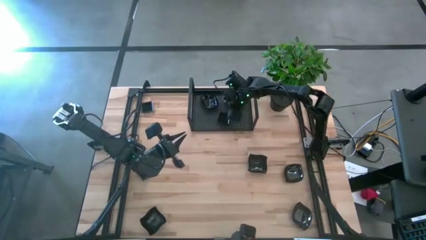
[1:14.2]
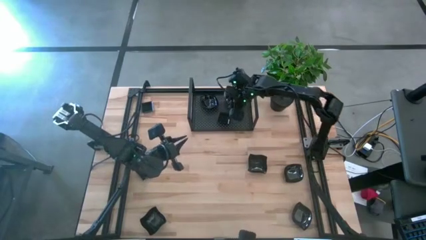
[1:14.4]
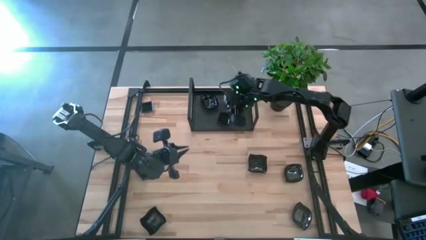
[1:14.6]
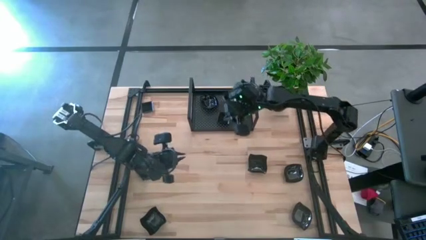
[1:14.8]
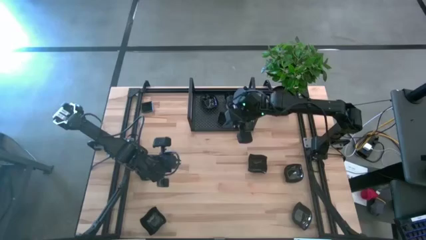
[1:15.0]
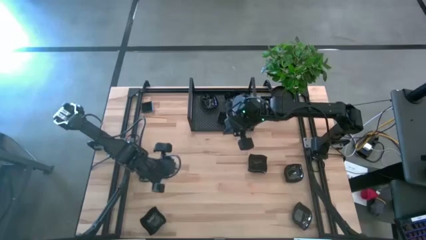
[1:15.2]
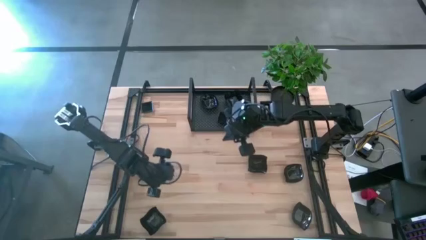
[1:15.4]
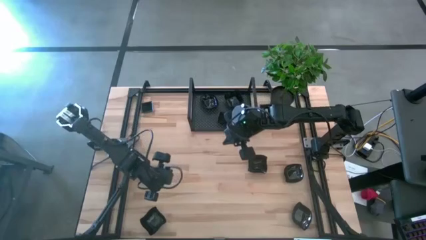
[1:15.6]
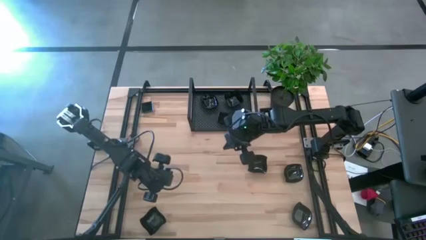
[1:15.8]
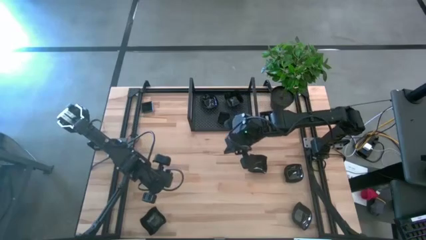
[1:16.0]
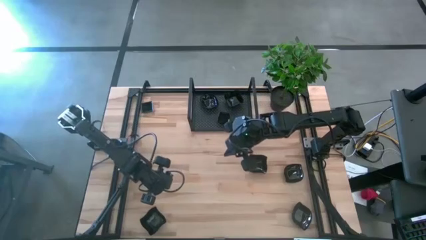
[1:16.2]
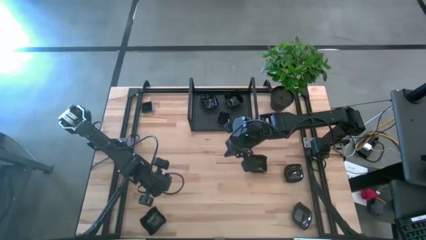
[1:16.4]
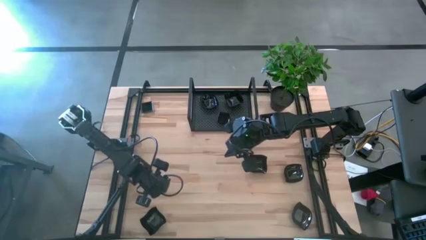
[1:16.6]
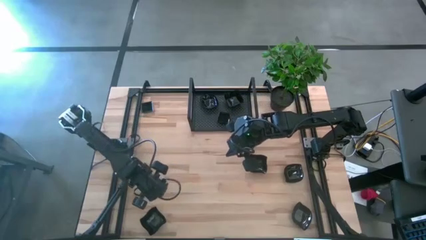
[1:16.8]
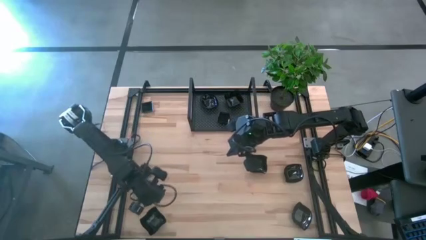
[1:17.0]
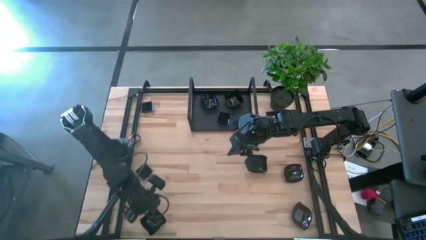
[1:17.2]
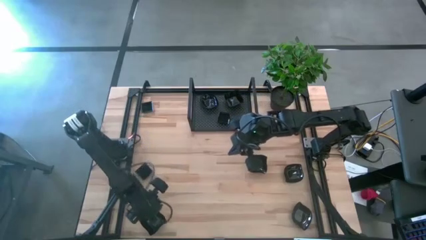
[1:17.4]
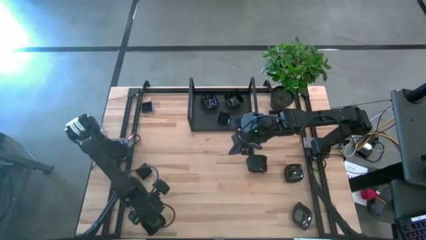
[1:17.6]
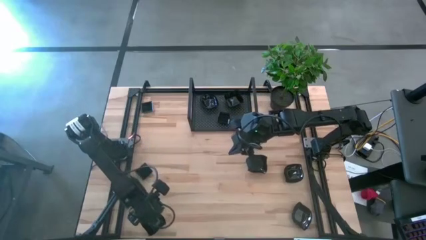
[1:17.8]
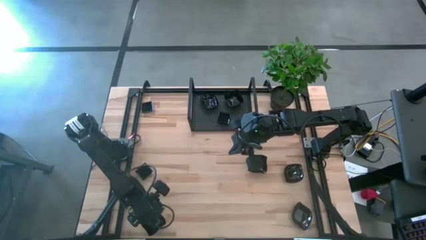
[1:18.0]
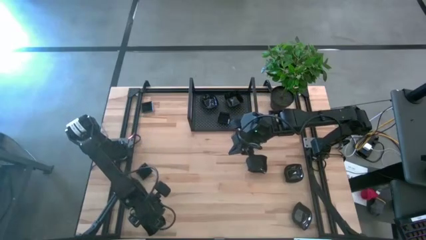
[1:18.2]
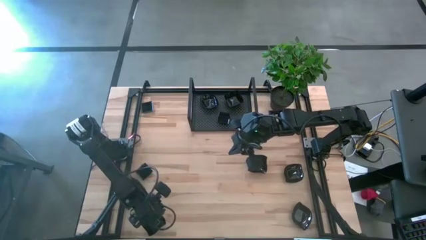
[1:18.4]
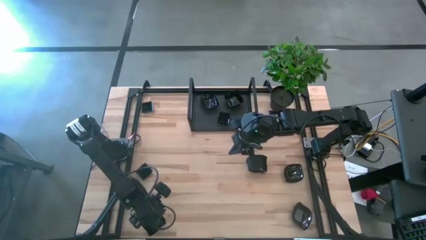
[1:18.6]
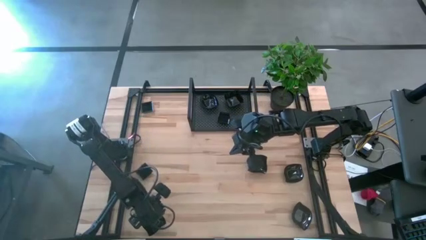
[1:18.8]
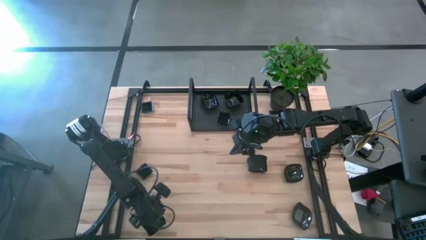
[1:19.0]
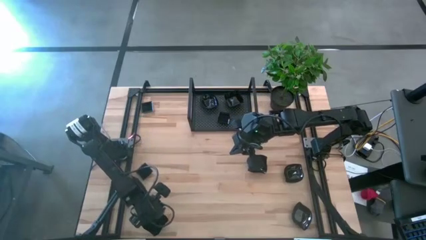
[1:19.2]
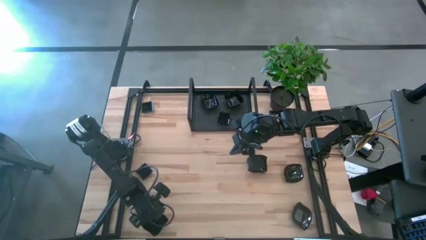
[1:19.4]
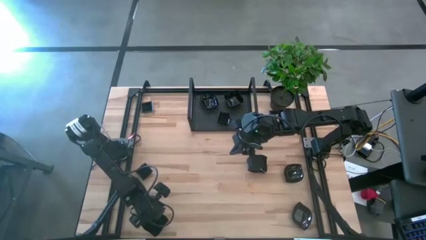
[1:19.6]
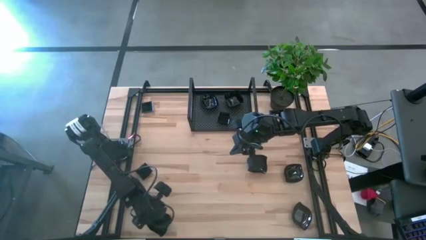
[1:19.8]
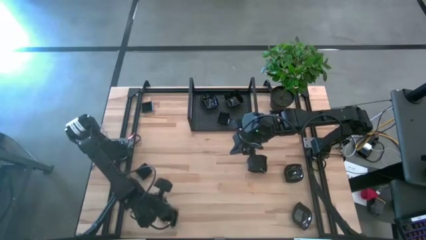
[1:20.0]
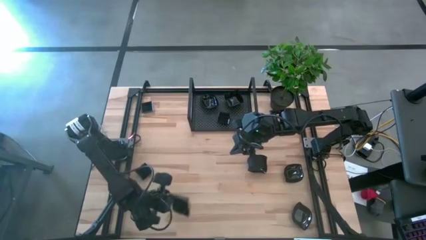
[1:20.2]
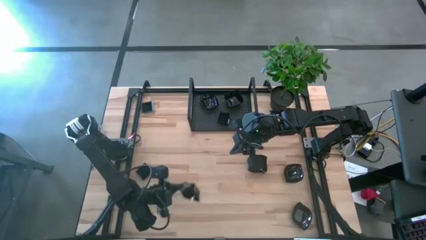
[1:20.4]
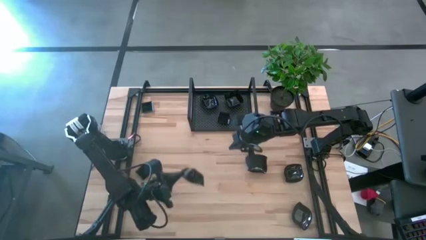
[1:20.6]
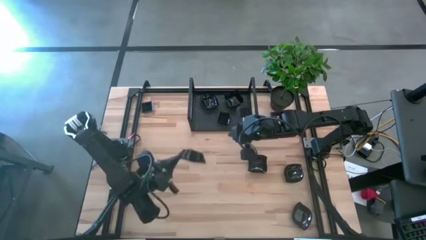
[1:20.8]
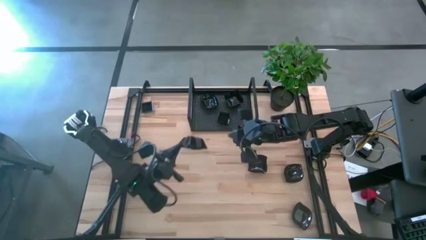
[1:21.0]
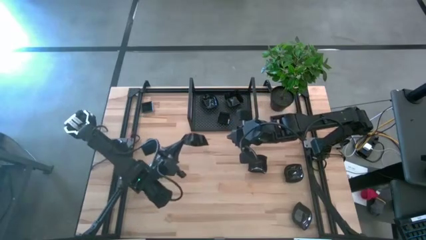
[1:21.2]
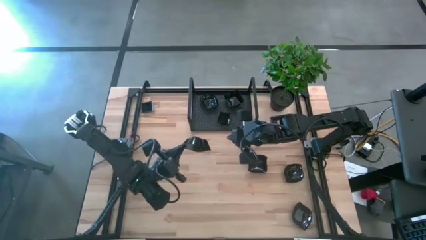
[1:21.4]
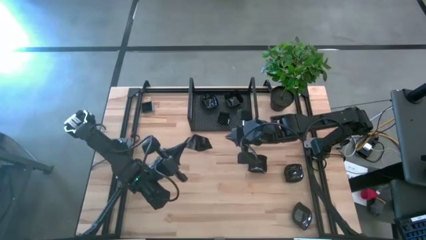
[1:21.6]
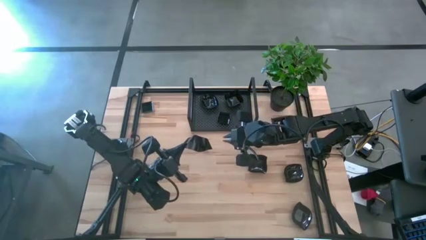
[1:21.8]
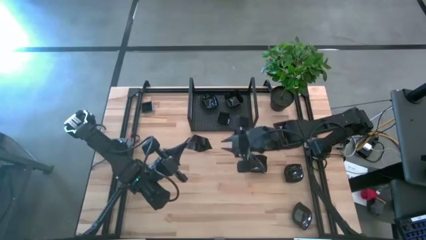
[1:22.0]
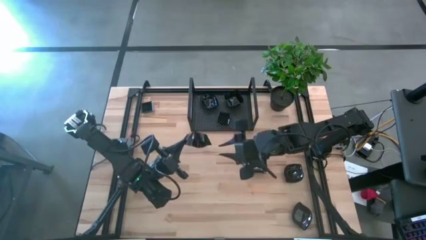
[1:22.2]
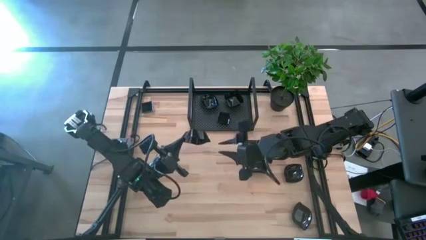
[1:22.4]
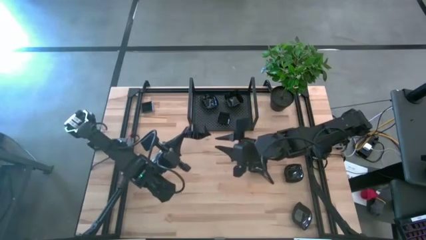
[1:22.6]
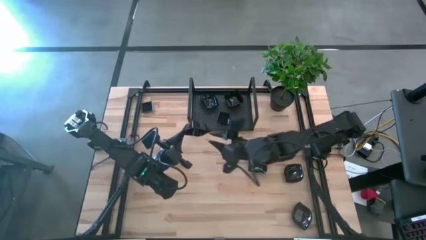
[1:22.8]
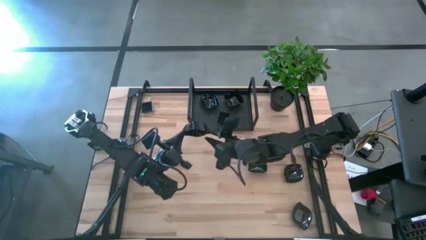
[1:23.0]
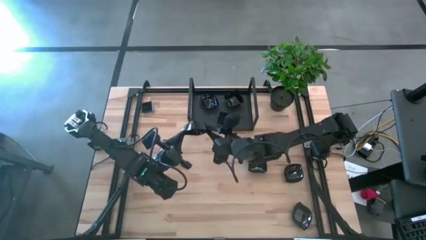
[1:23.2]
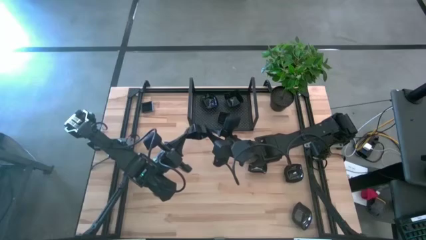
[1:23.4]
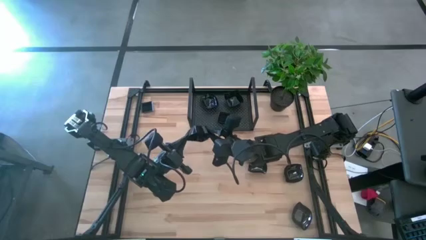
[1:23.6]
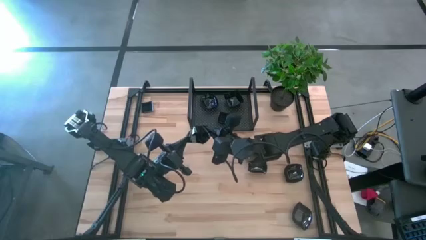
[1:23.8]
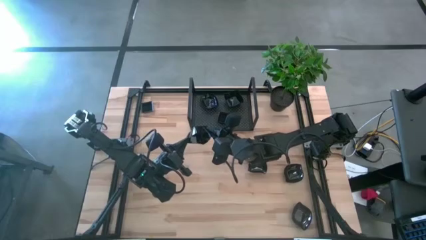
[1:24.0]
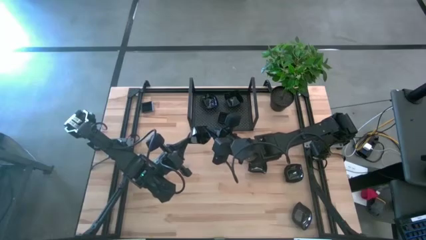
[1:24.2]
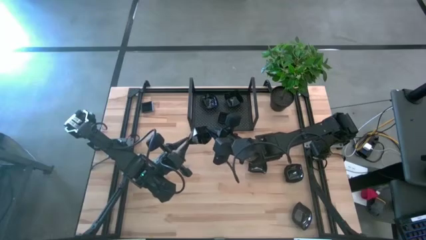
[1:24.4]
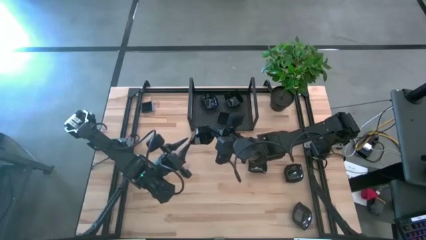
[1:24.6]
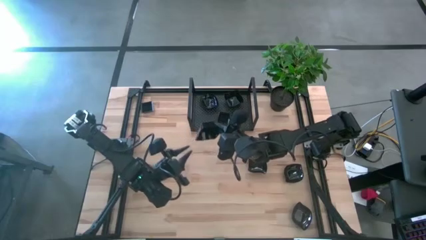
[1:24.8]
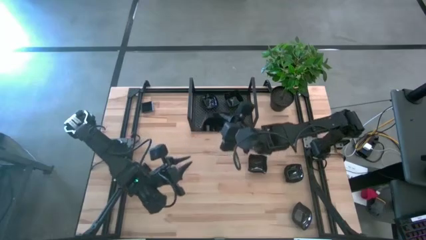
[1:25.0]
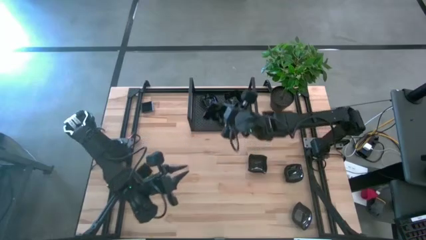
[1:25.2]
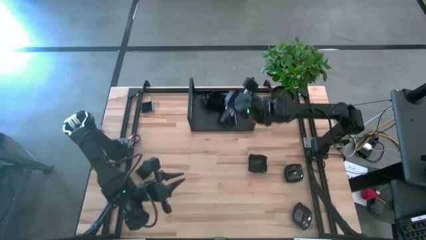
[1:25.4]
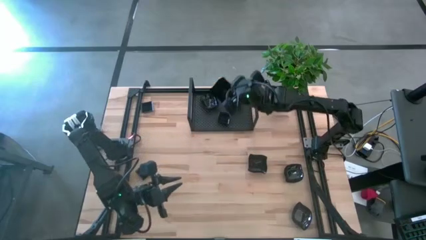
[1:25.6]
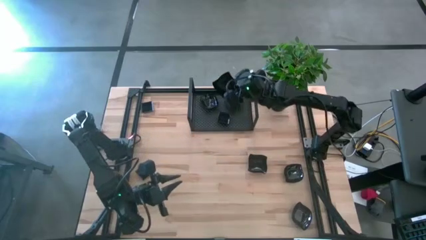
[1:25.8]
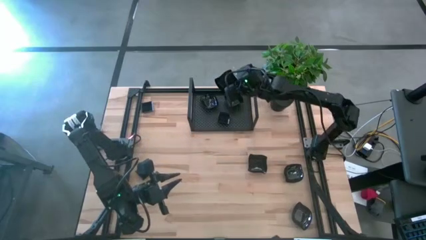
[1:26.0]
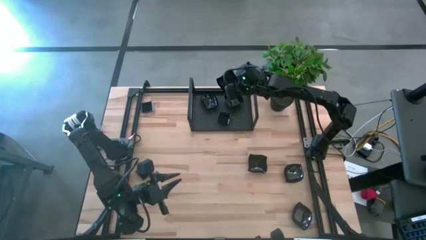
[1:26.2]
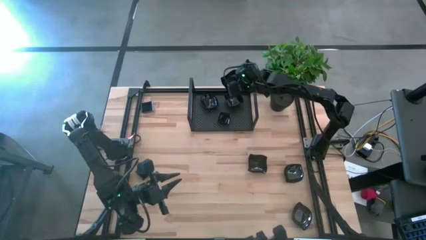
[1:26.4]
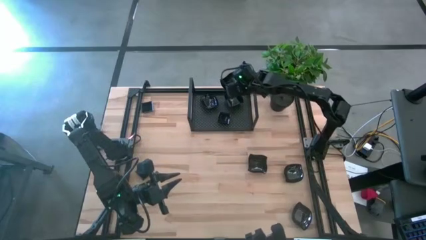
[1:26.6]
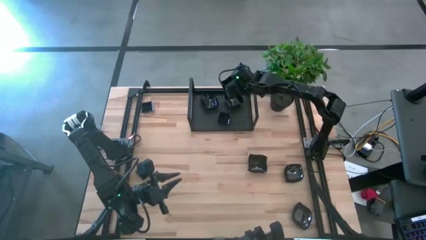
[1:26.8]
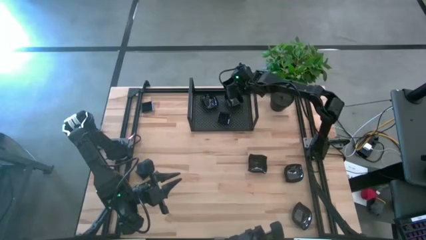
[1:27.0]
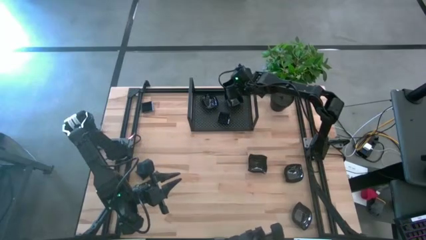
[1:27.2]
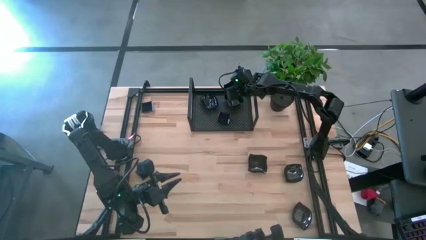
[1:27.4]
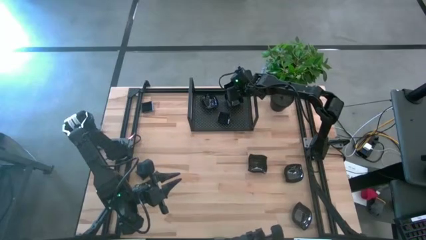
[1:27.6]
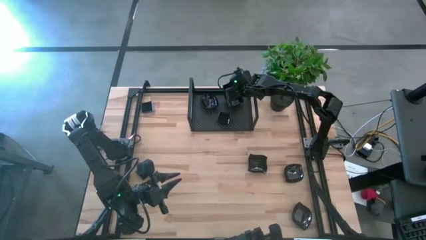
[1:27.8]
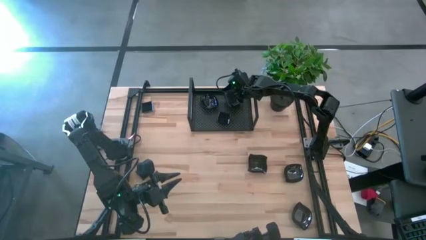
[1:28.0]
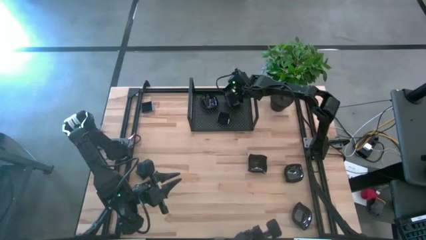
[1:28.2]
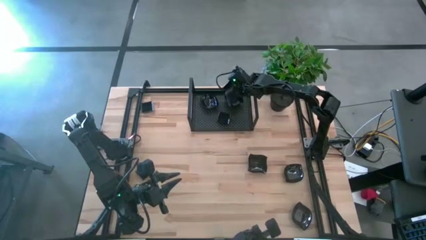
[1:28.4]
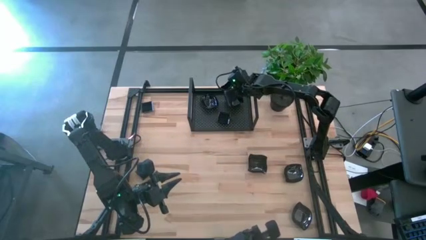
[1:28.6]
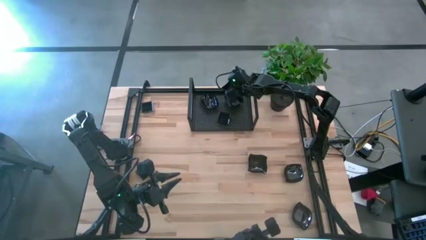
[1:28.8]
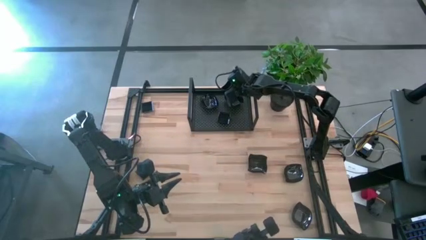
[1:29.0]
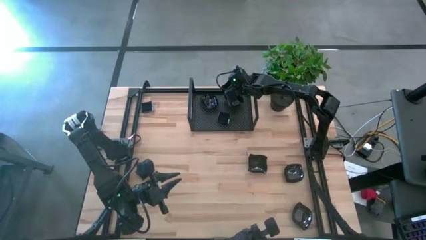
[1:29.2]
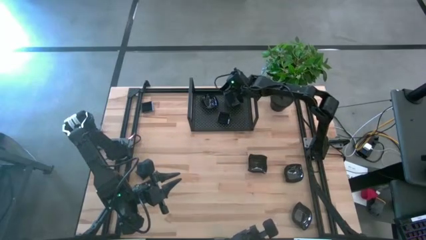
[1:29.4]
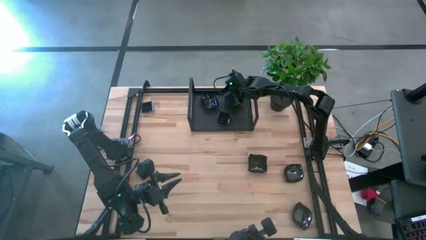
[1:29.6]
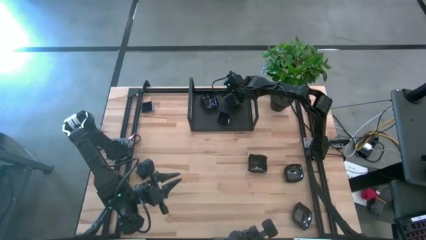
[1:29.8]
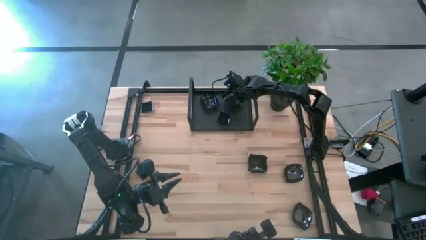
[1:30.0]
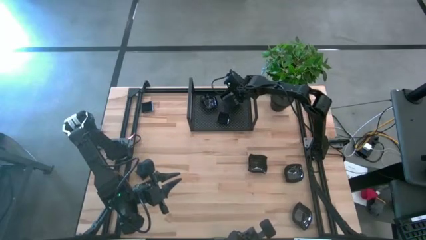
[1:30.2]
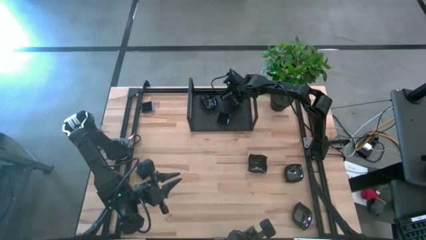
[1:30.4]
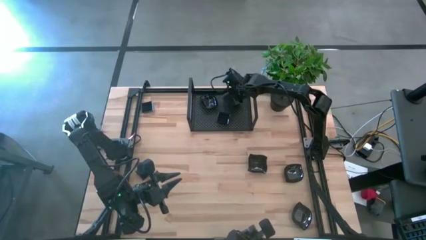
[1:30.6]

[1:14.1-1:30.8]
Task: Pick & Place Mini shaped plates
Stack the black distorted square plate on top of the black distorted square plate on the shelf
